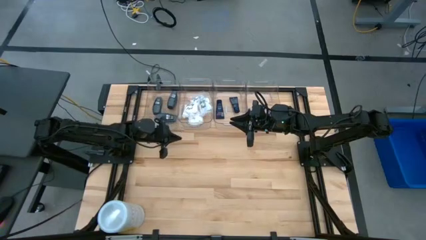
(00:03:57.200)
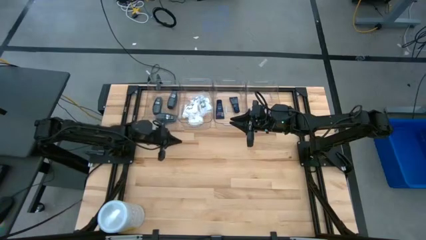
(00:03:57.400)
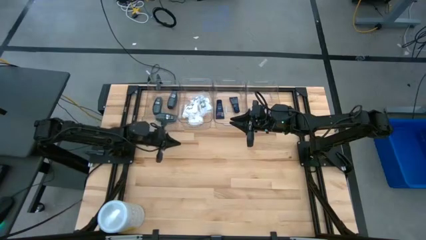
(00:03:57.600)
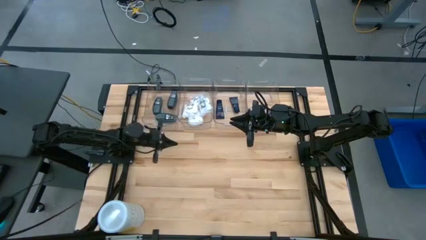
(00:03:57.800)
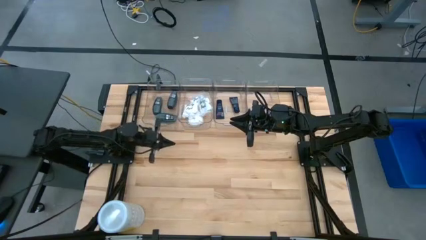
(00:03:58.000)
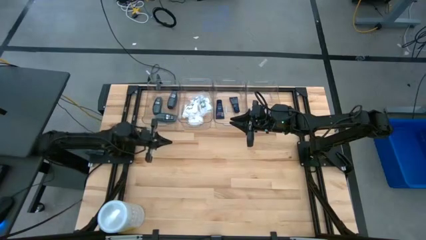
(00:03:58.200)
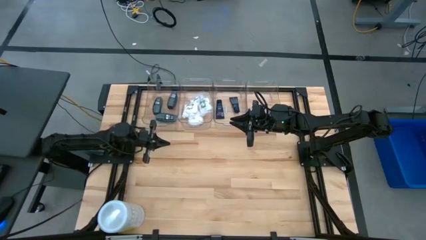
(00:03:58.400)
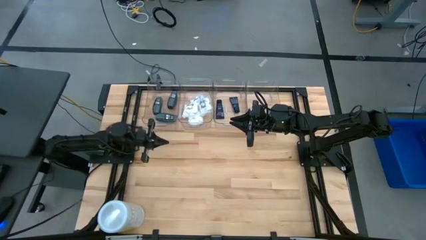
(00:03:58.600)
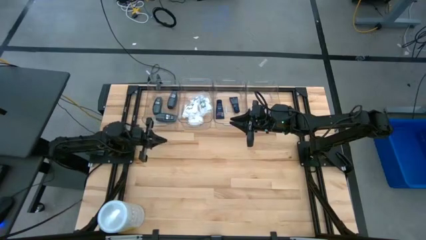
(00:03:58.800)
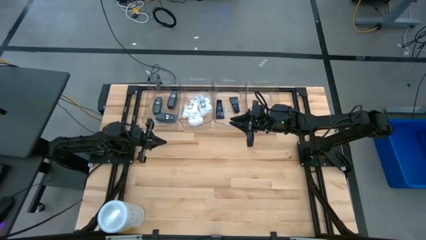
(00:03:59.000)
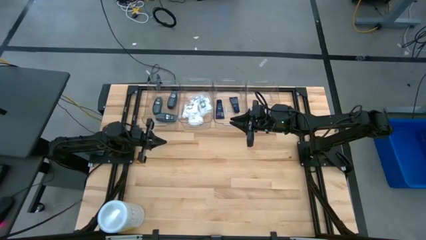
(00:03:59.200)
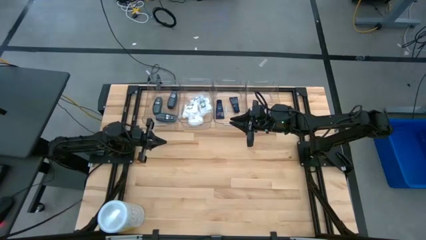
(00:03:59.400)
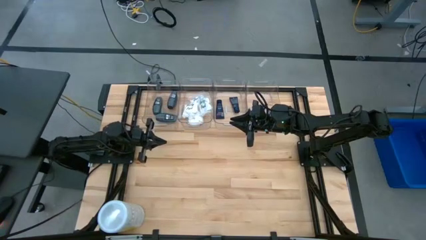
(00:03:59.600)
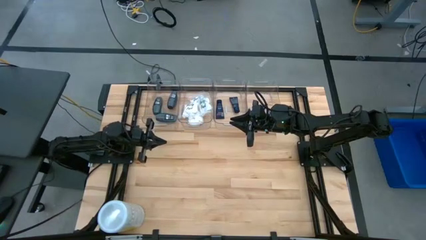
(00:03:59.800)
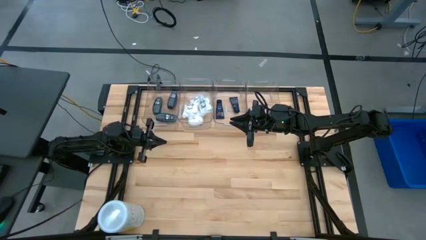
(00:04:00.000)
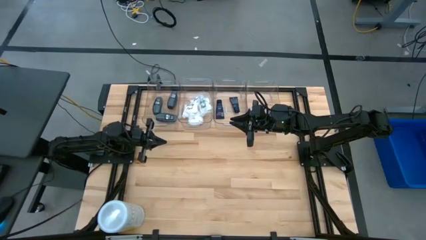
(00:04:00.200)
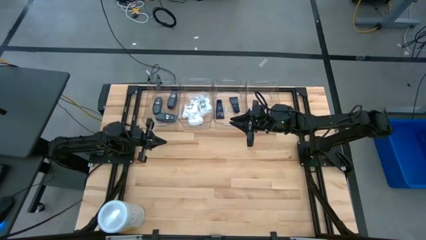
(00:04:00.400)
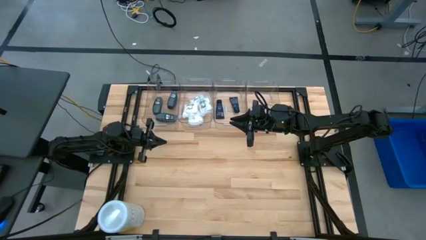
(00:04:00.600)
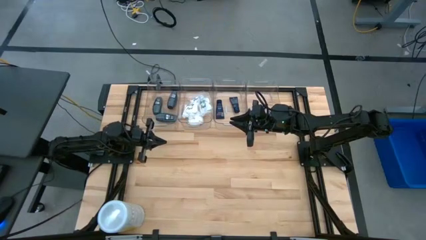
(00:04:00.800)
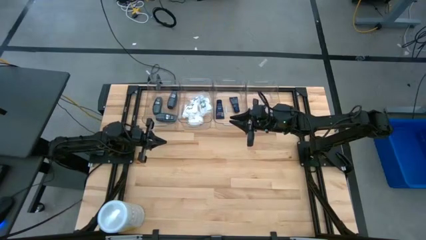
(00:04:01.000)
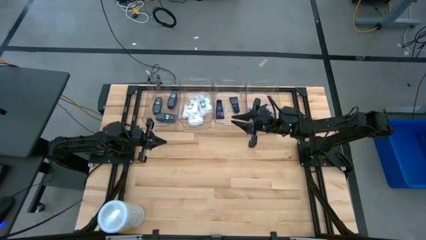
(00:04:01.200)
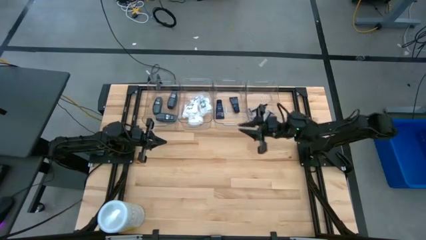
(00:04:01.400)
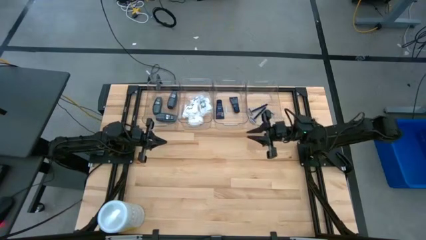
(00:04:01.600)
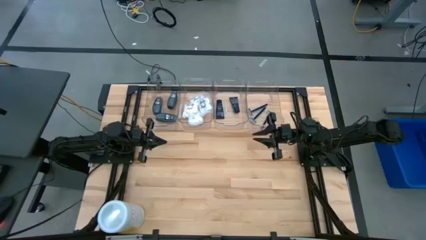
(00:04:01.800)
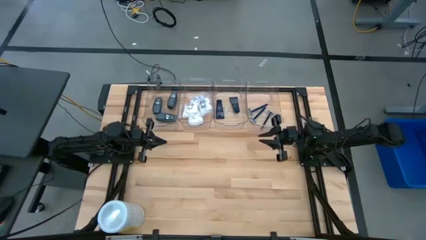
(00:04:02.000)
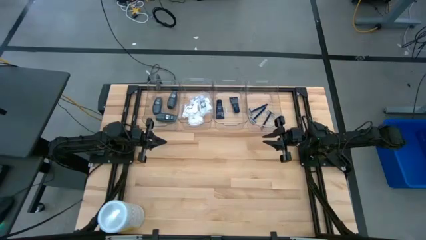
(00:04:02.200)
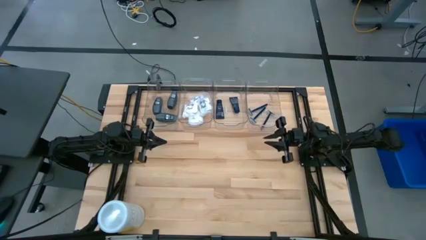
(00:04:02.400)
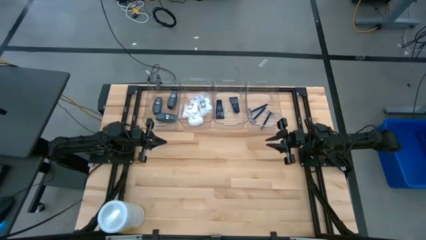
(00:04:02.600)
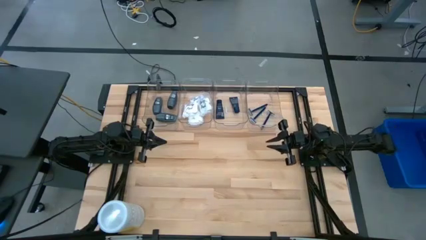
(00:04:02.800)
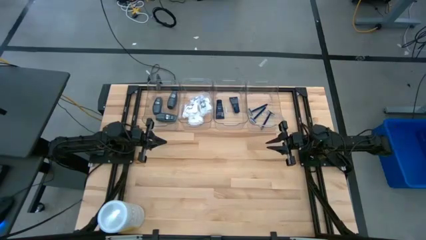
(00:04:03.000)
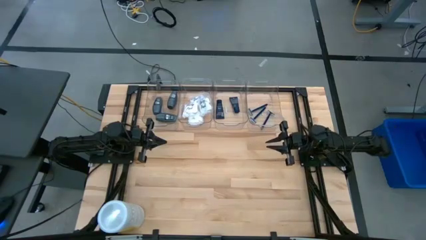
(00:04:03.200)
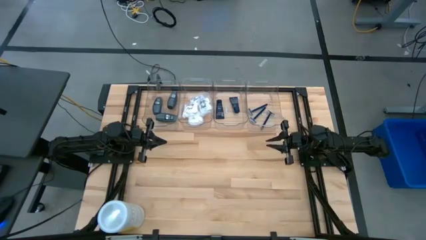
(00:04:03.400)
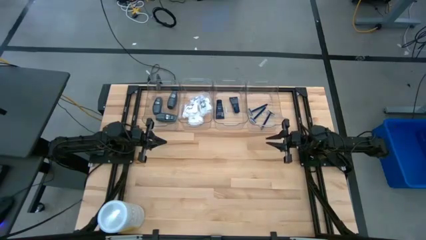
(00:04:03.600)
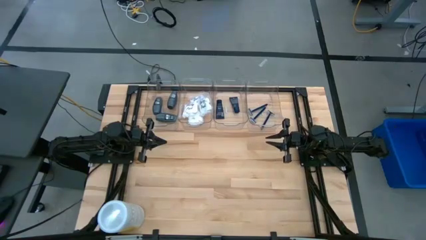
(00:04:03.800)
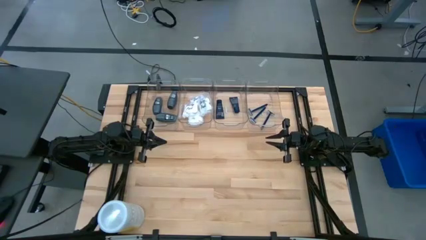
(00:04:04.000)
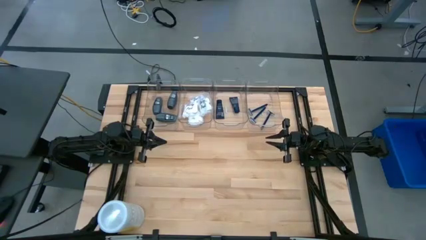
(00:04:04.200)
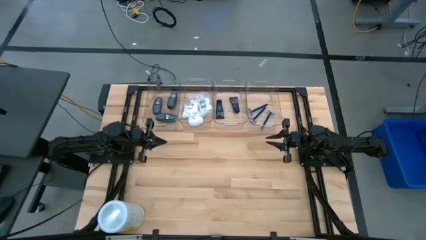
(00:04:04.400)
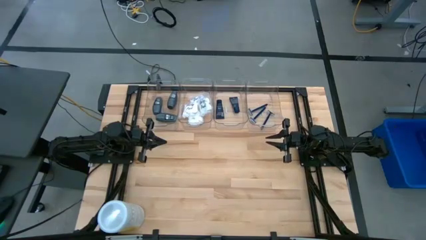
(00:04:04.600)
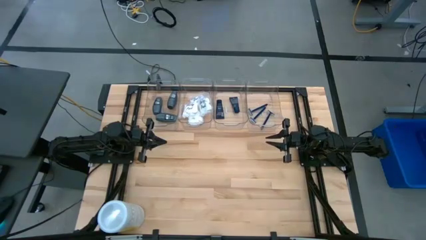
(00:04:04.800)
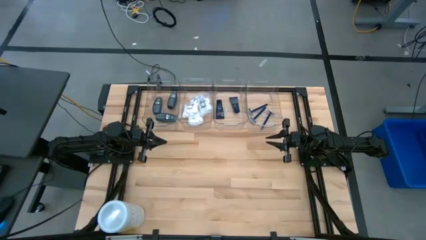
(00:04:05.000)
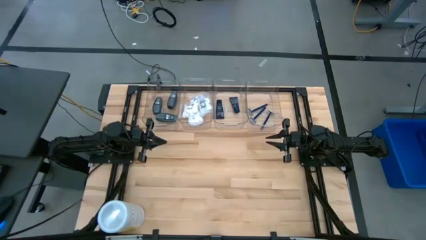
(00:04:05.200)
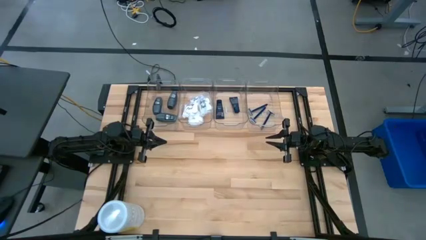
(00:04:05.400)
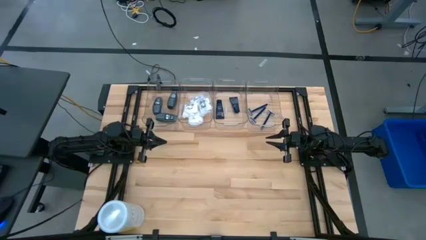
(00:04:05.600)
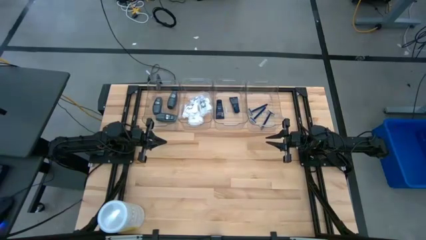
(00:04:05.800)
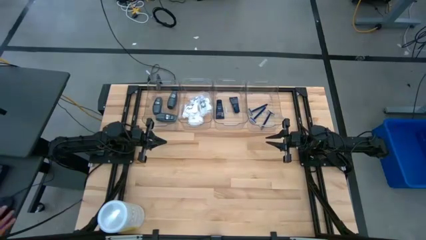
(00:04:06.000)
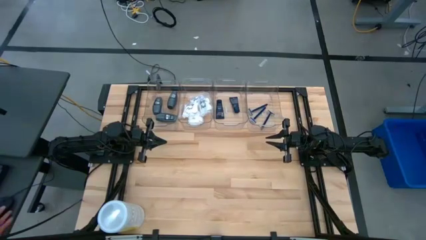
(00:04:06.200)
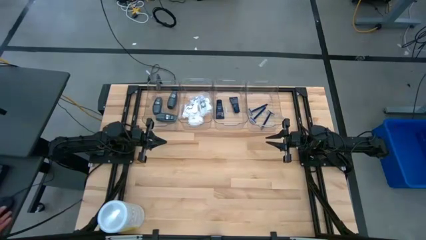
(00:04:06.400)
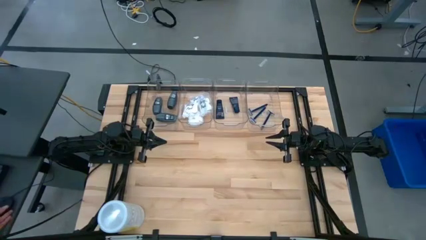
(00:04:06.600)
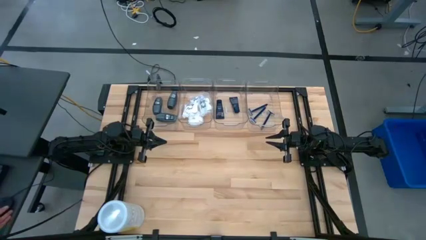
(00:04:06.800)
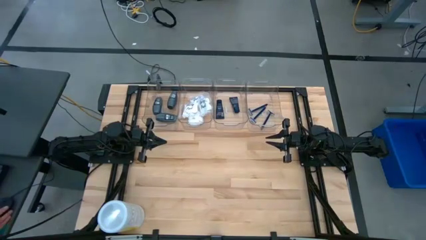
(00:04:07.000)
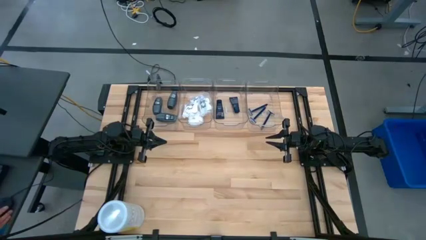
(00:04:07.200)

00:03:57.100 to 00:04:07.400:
Task: Pick & Place Travel size toiletries
Return to home position

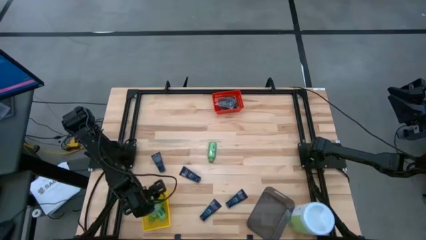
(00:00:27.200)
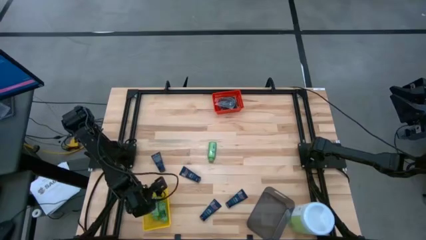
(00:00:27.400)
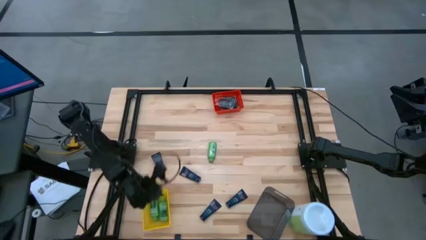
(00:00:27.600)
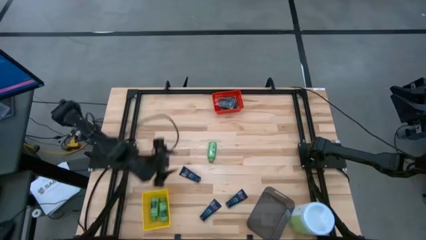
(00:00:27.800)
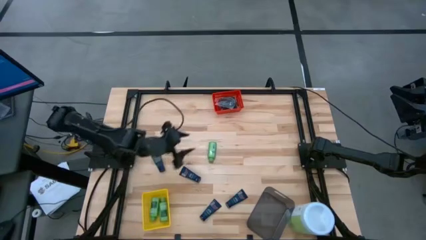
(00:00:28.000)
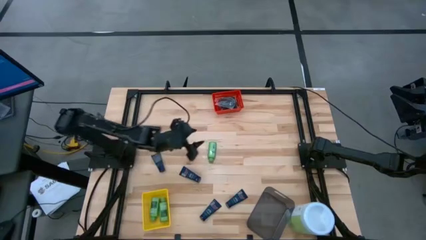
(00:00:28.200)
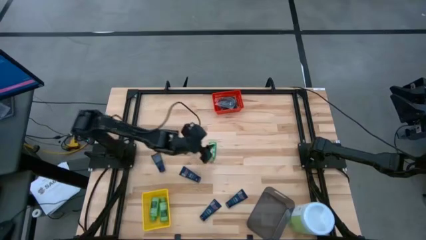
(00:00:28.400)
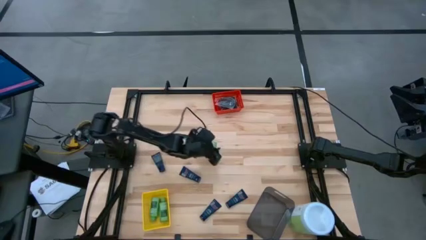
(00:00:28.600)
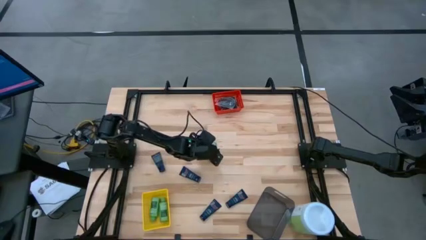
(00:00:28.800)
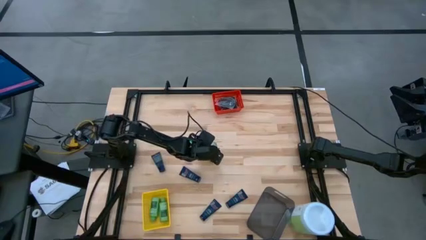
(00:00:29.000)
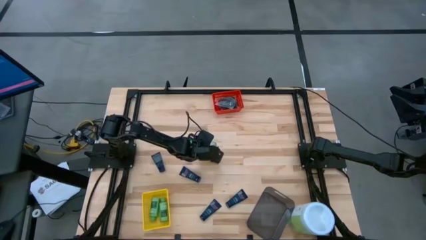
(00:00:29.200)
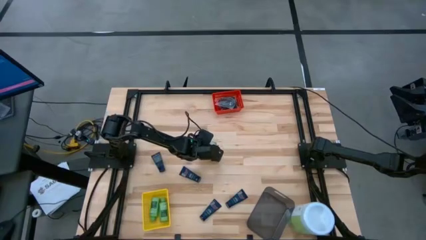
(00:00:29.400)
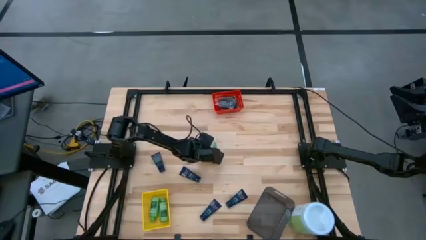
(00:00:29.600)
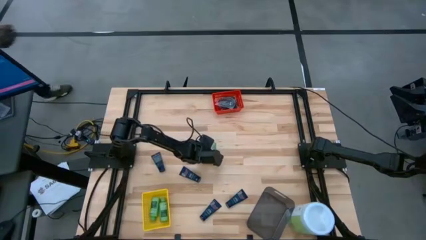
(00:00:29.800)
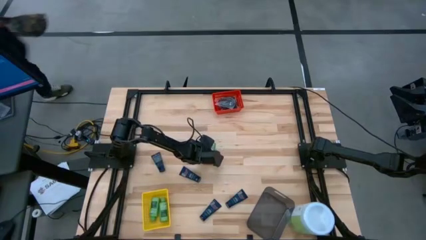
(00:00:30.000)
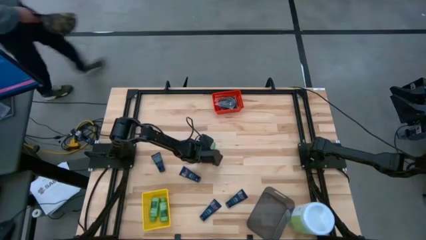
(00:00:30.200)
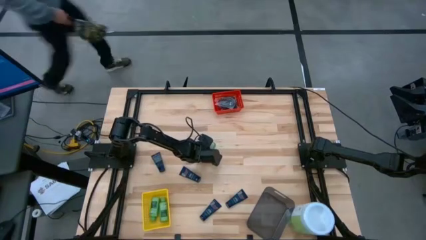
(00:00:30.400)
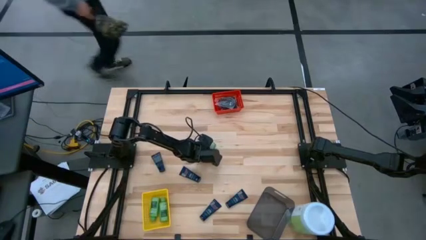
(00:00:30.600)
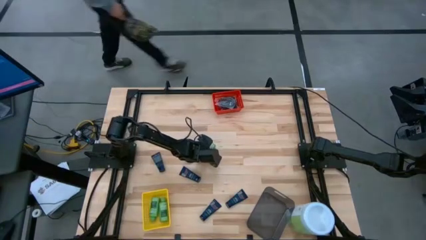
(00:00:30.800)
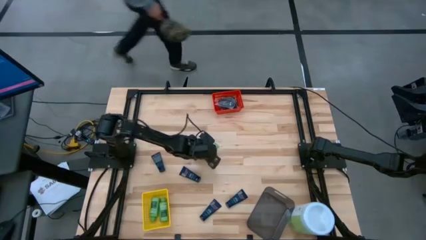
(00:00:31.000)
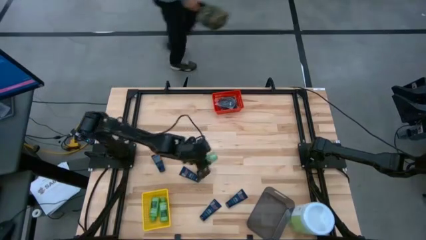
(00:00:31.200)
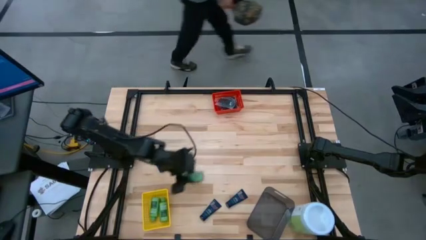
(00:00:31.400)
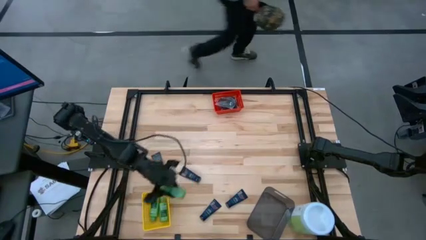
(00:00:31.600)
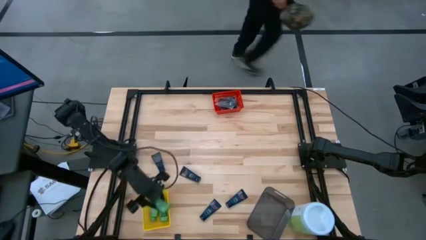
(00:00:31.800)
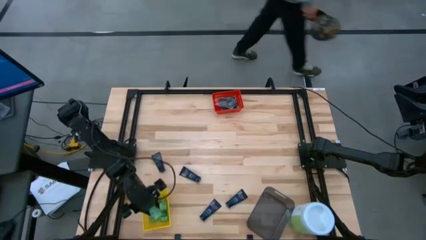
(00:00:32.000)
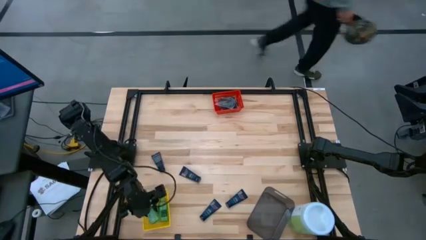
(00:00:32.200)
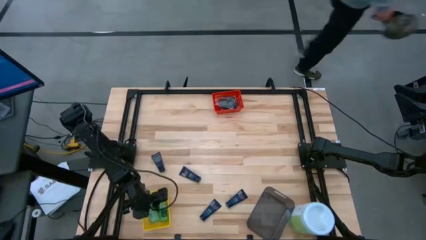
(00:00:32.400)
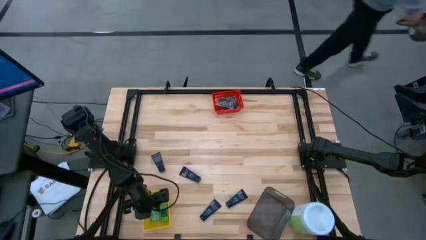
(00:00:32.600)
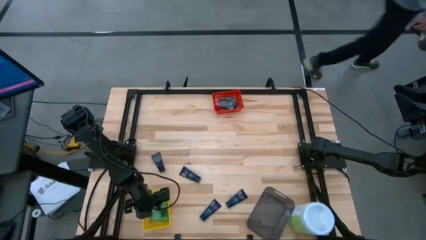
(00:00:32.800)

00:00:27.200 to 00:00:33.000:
Task: Pick & Place Travel size toiletries
Put the green shampoo into the yellow bin

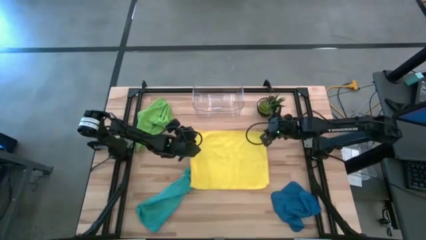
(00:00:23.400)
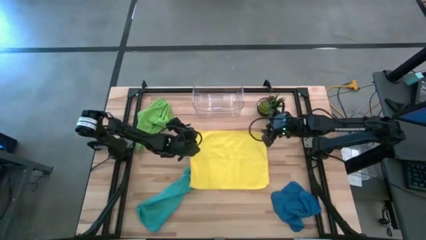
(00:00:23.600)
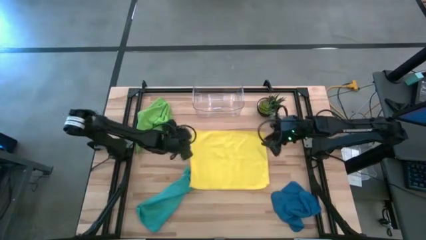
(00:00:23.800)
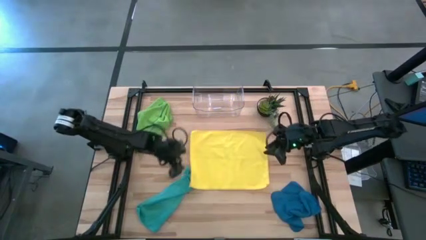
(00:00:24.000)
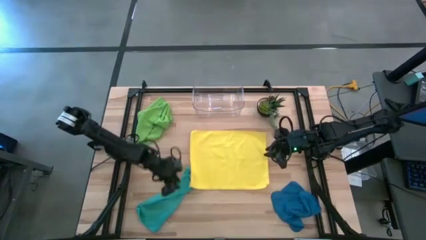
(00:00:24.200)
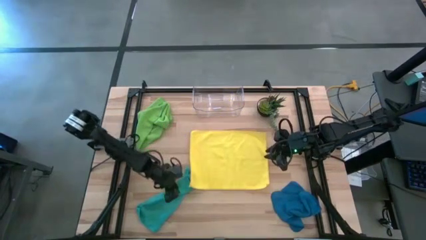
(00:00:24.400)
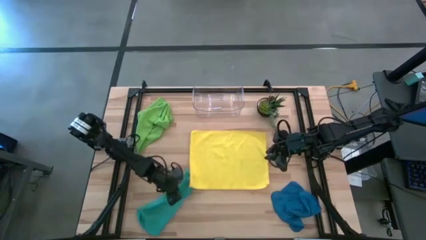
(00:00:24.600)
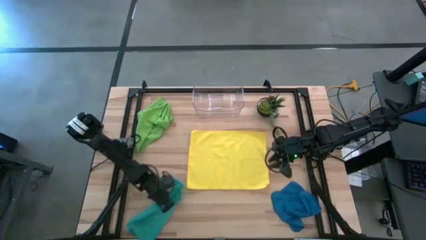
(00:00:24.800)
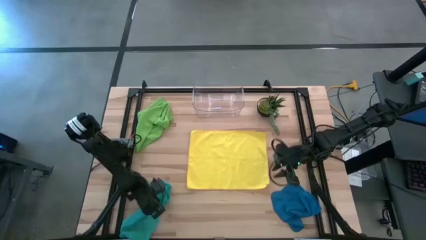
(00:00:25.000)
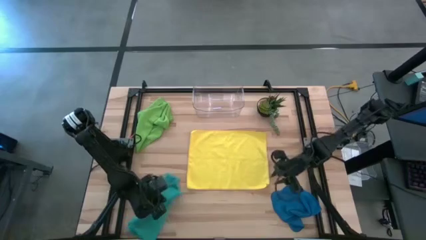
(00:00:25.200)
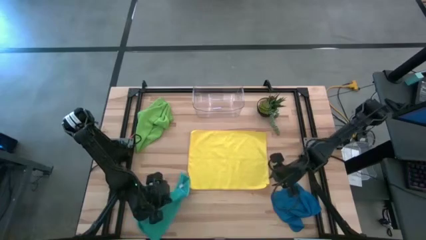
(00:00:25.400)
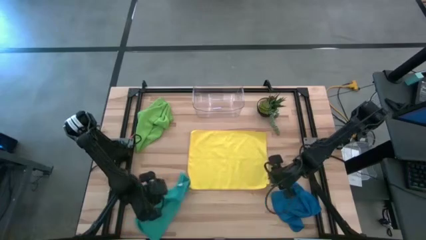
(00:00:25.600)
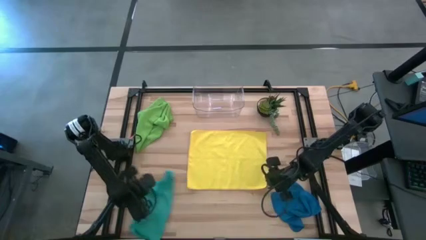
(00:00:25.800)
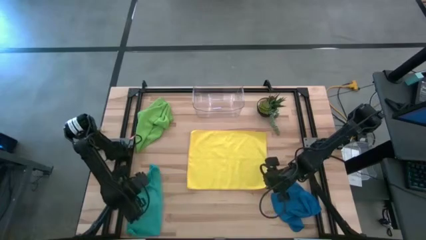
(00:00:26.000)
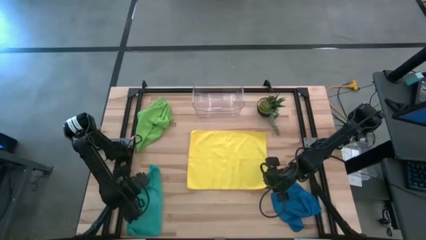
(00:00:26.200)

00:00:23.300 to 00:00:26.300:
Task: Fold microfiber towels
Adjust the light blue microfiber towel
